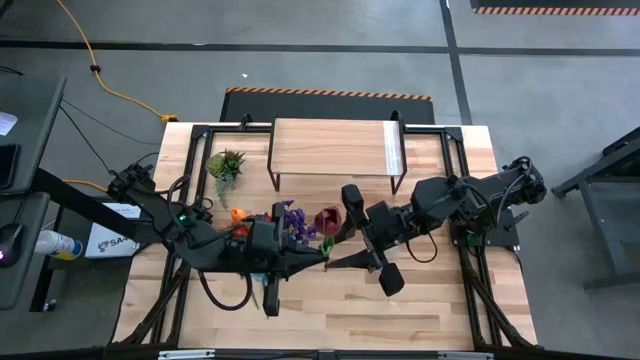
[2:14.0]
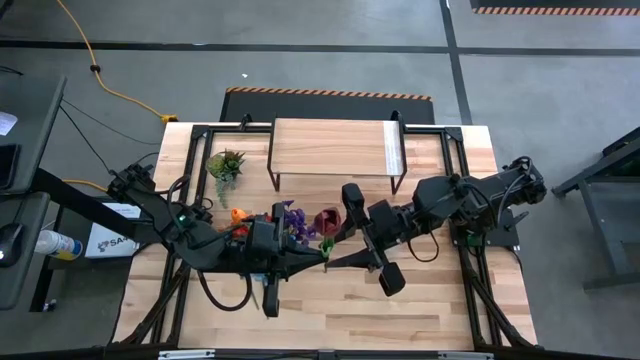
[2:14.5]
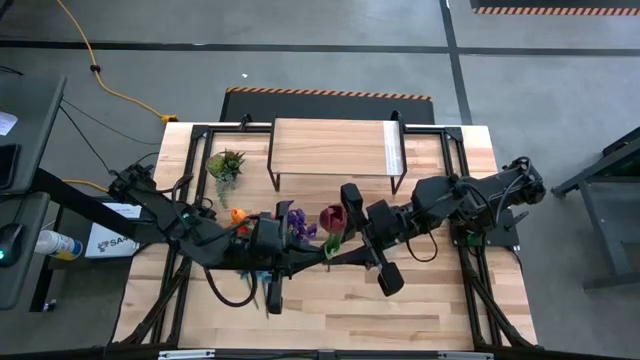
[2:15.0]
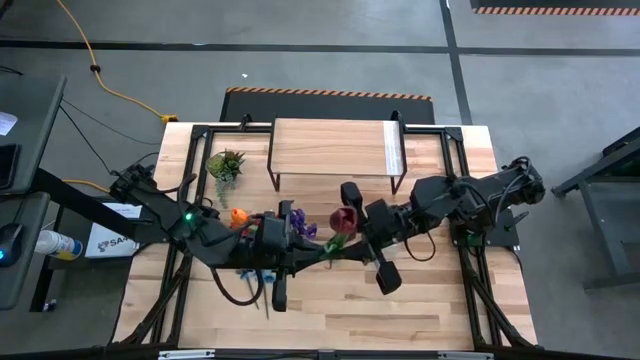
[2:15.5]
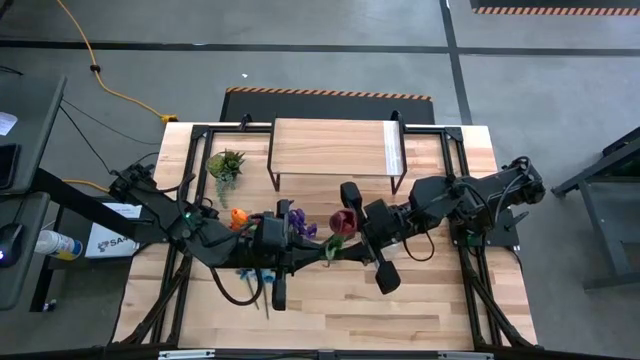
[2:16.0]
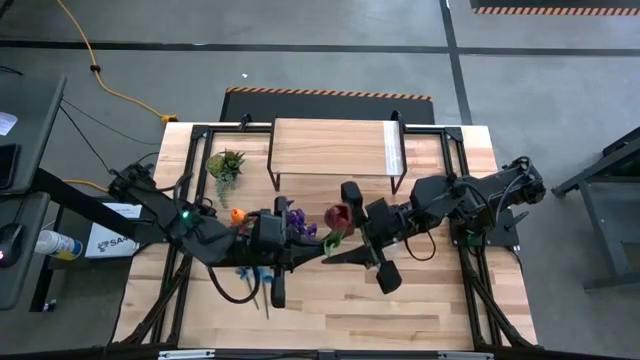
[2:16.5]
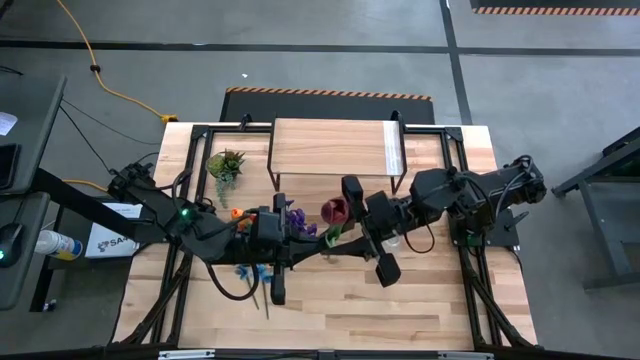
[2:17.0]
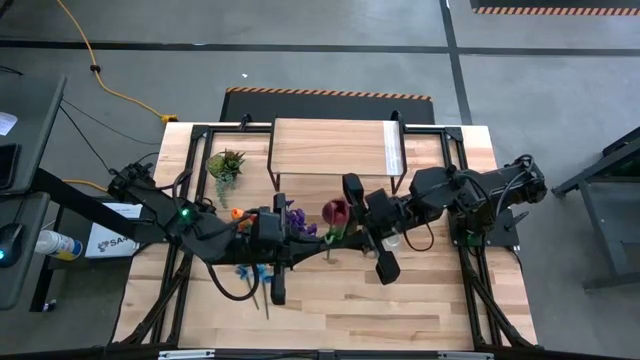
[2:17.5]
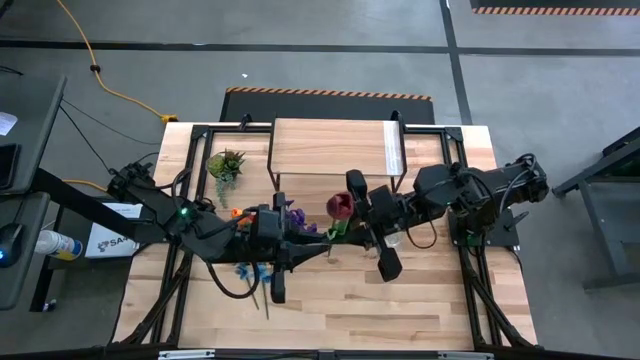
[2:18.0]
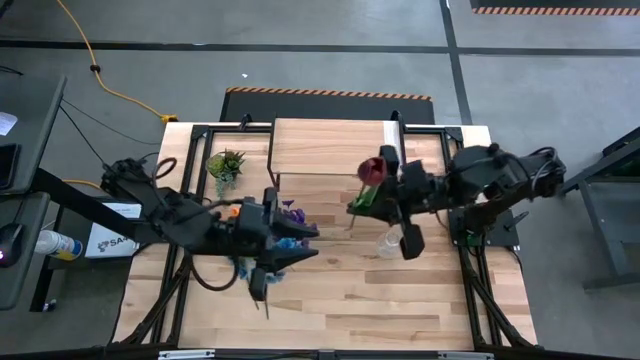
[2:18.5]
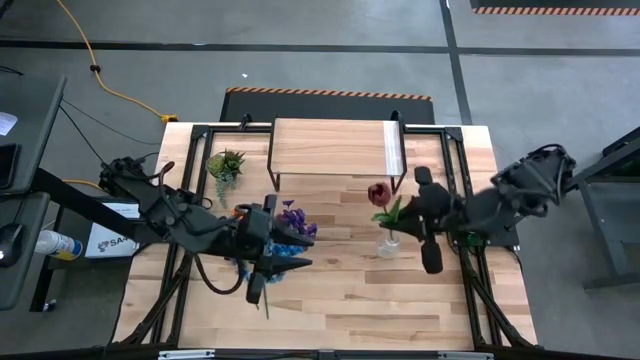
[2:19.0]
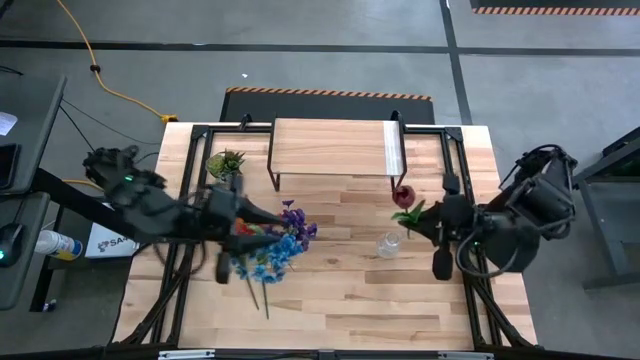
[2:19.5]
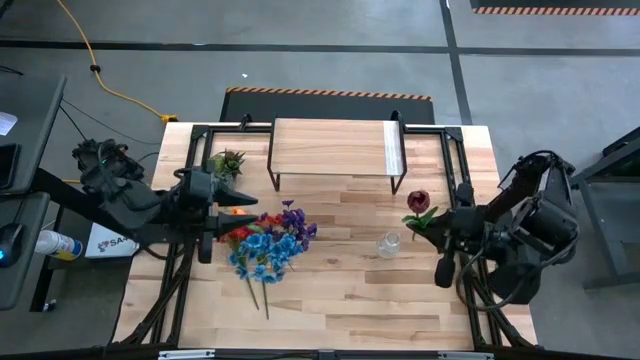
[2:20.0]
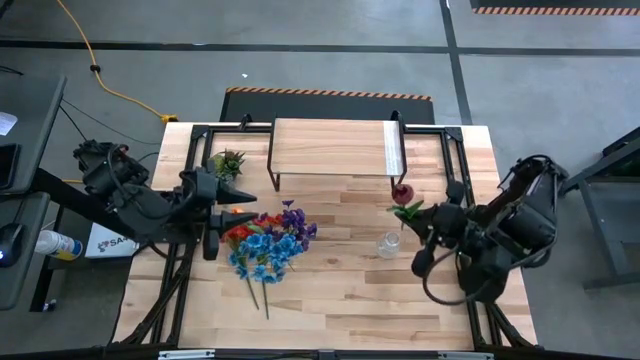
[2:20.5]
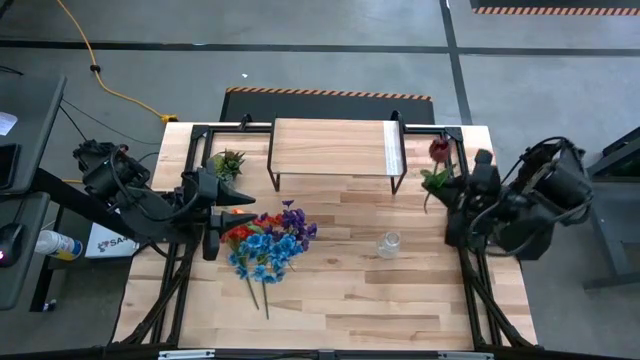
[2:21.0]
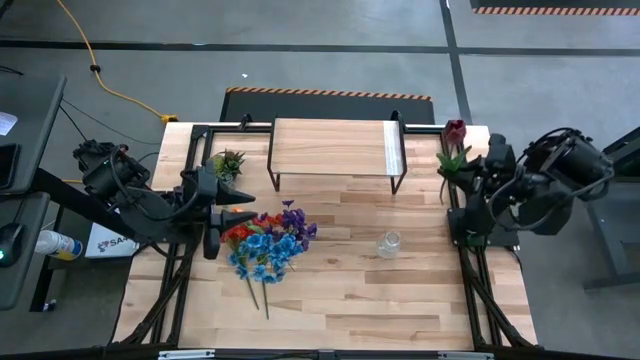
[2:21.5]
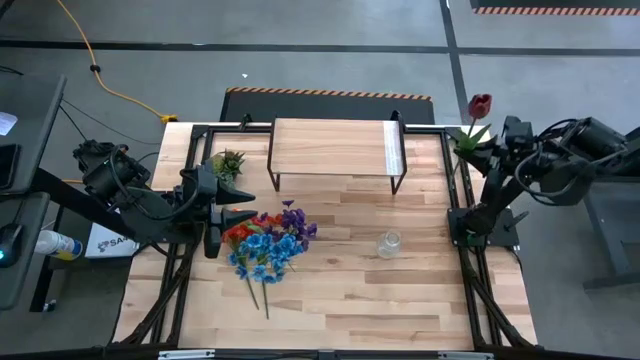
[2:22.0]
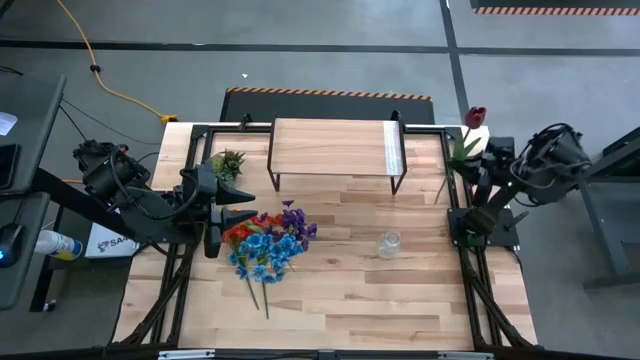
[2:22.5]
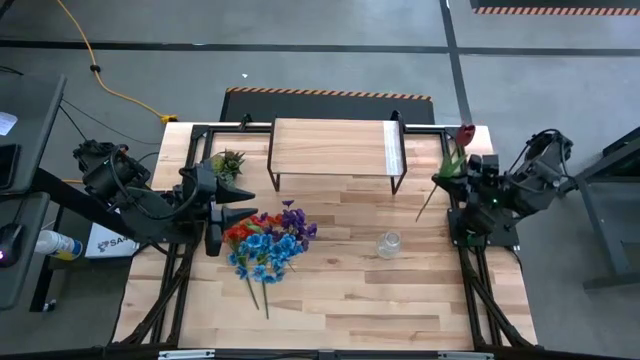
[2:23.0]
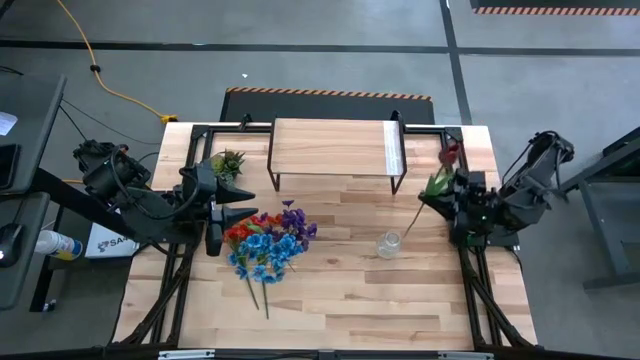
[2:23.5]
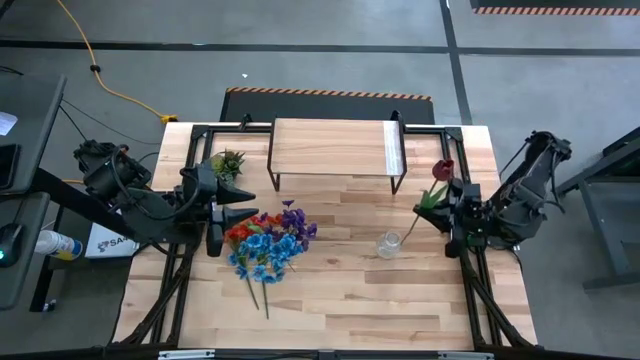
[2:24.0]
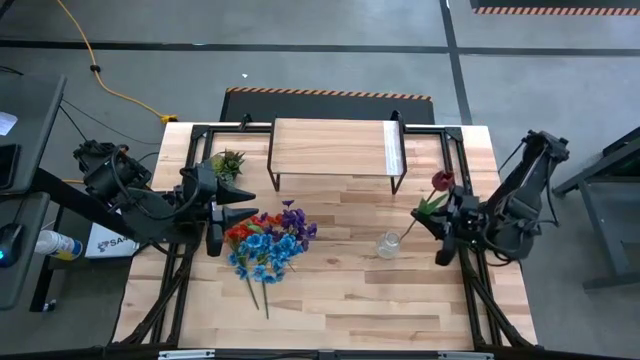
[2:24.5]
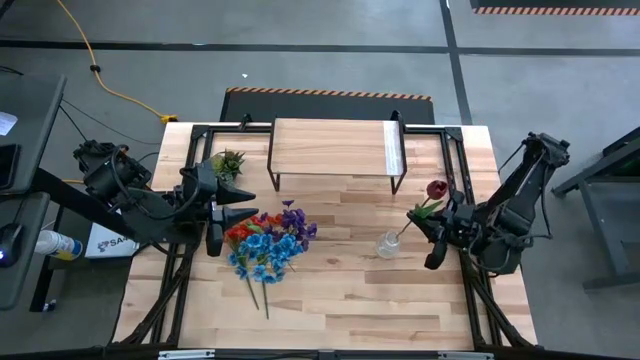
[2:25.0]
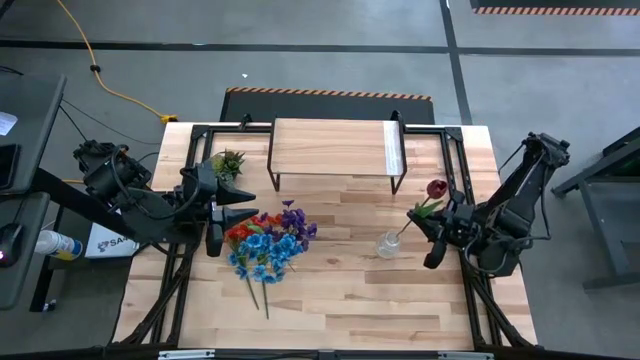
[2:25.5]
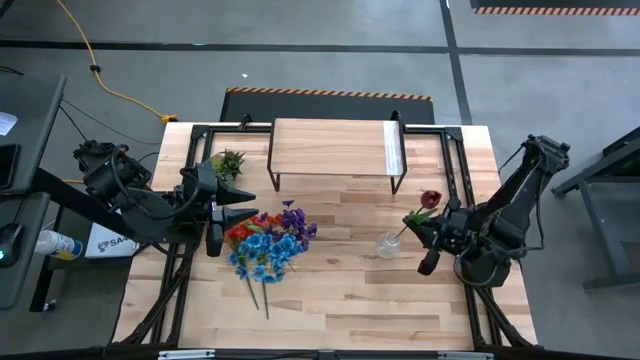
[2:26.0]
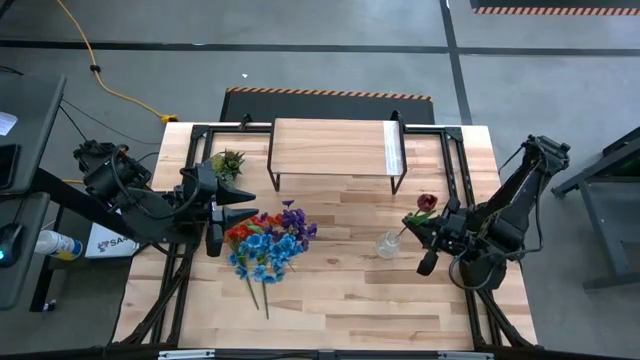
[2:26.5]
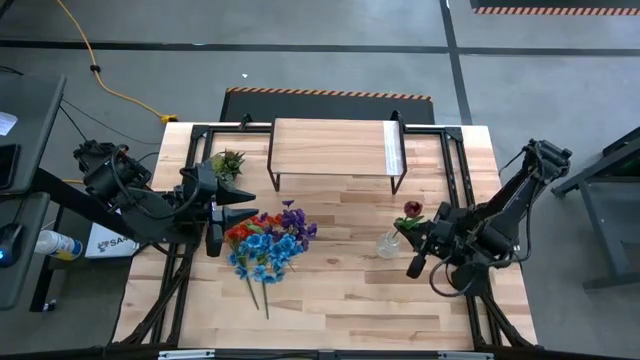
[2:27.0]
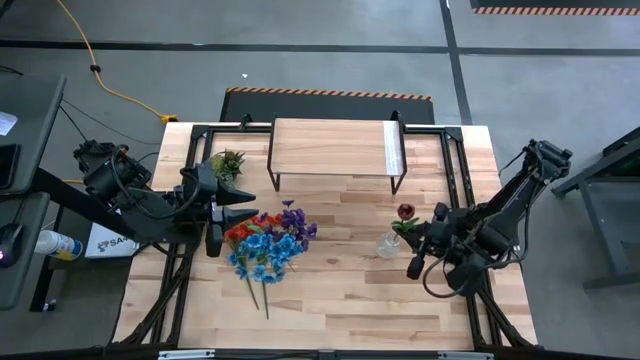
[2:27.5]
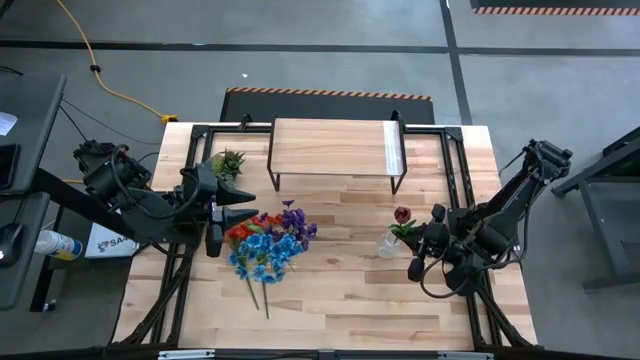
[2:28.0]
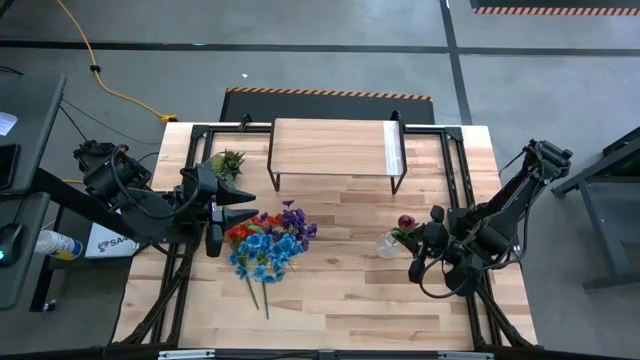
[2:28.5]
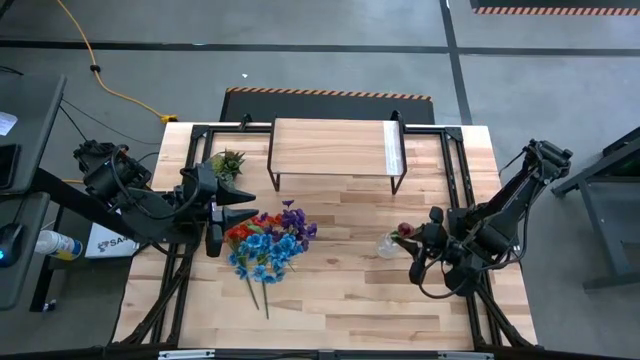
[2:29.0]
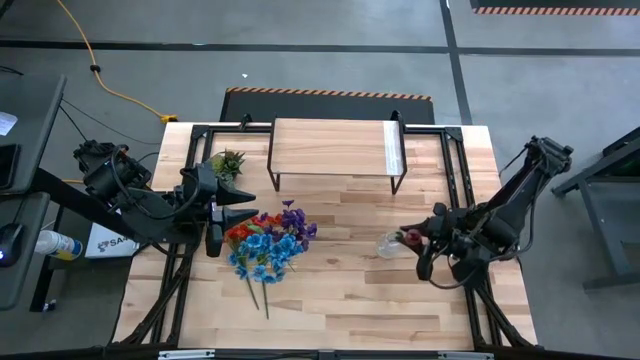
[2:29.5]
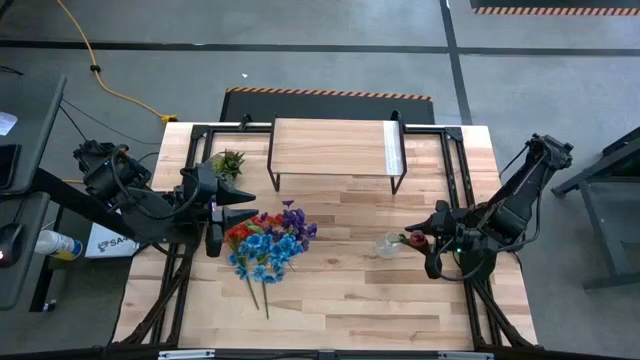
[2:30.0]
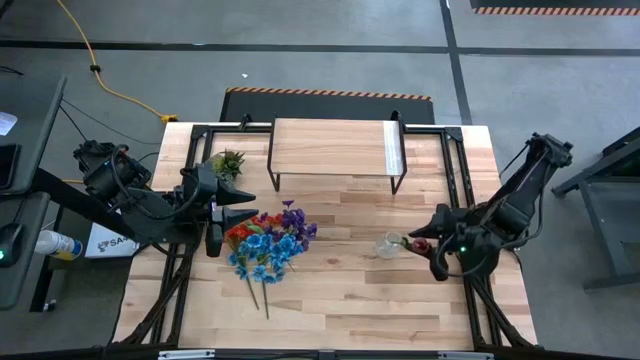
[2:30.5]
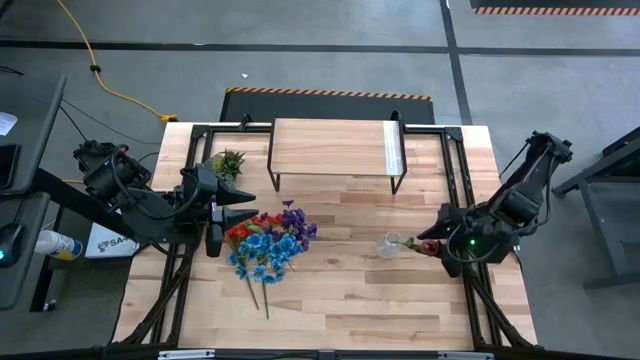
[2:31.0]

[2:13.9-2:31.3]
Task: Pick and place flowers into a vace then onto a shelf
Put the red flower into the right transparent flower vase

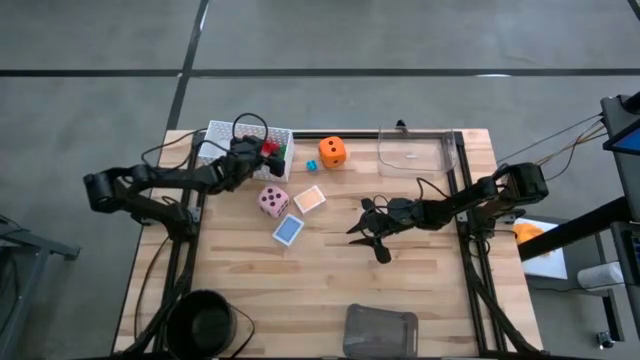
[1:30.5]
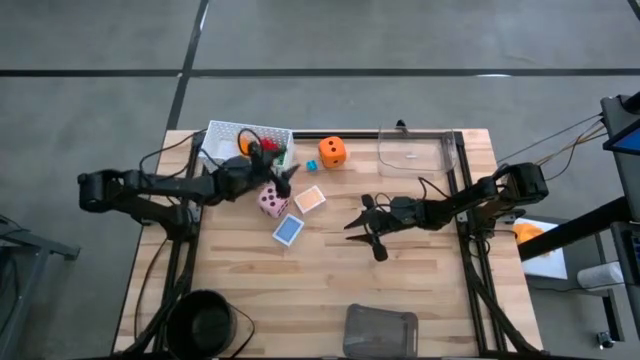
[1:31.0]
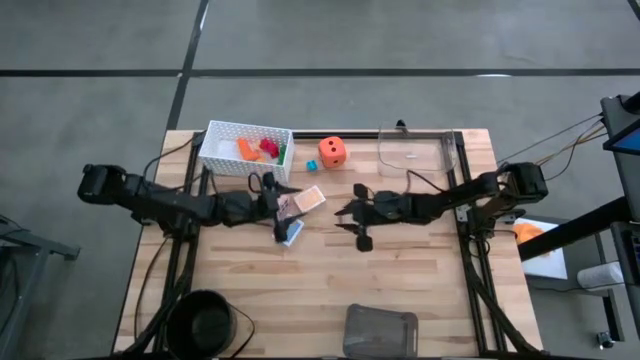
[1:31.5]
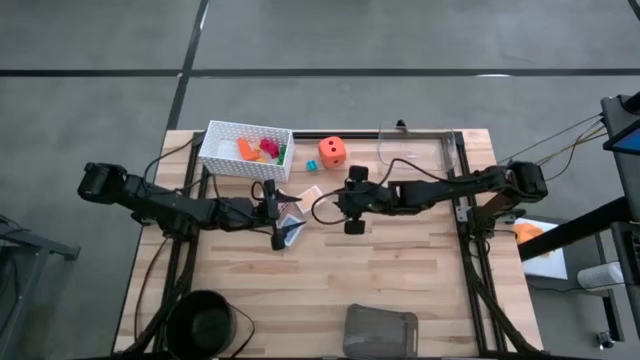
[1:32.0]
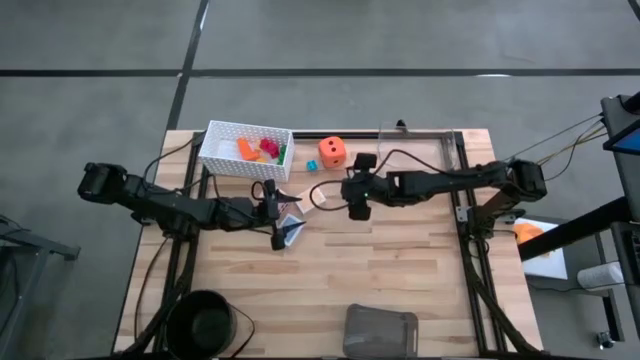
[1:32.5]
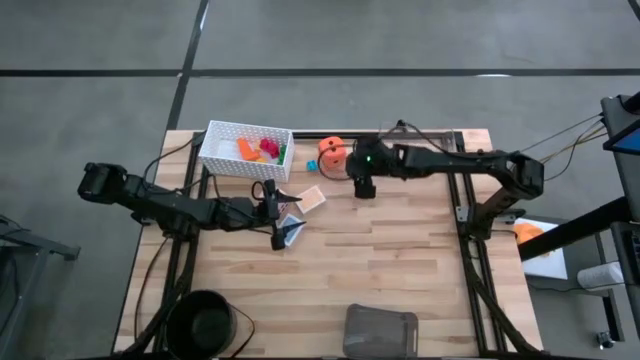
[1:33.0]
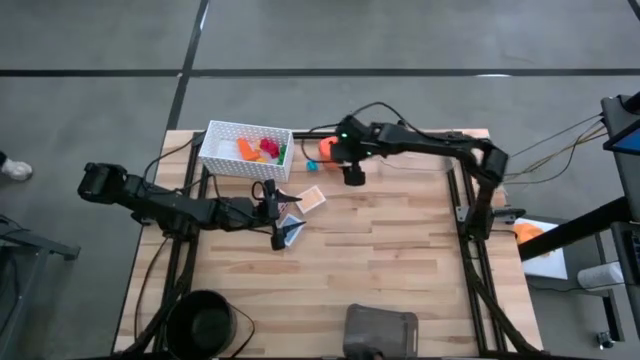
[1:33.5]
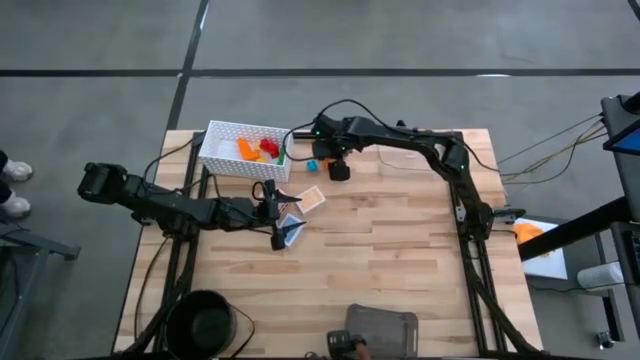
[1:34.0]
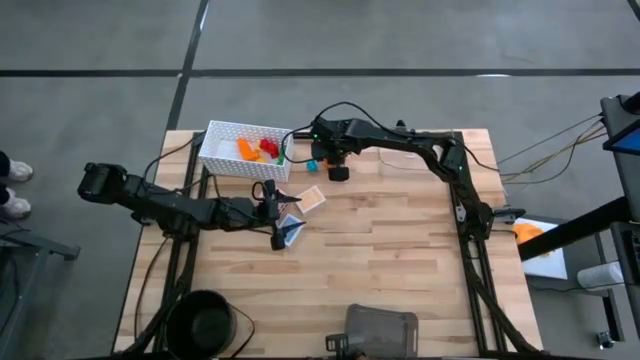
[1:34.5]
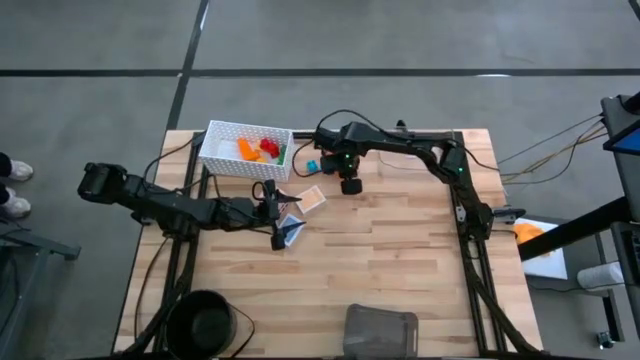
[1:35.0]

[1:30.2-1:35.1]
Task: Pick & Place Toys
Put the orange dice into the transparent bin
